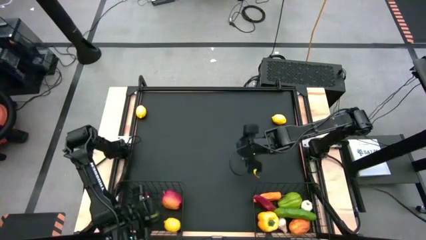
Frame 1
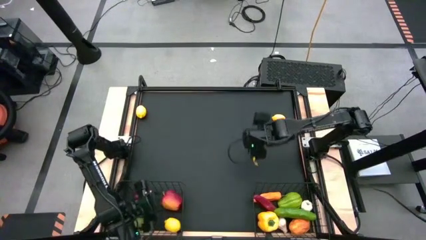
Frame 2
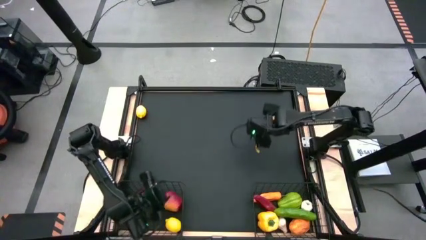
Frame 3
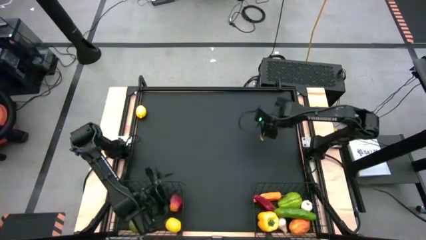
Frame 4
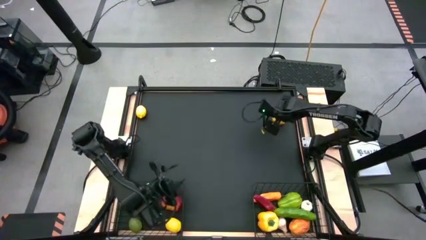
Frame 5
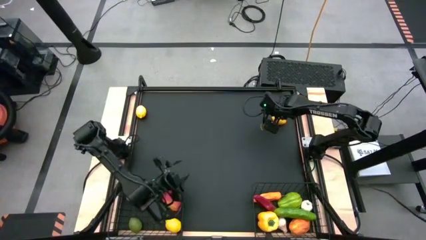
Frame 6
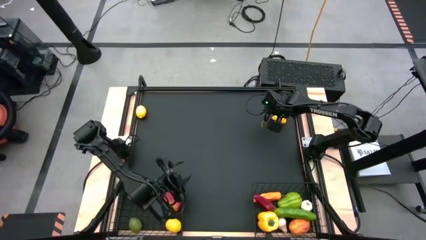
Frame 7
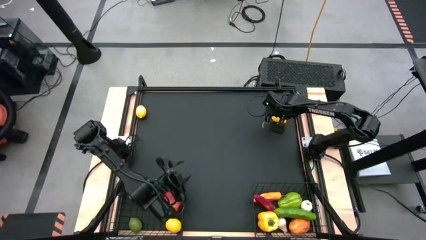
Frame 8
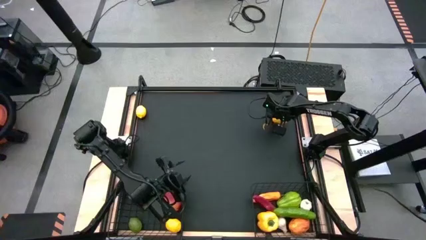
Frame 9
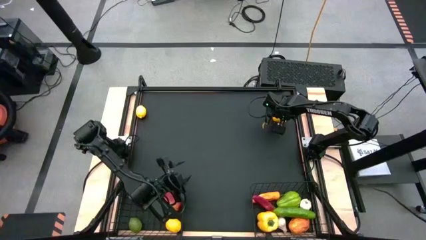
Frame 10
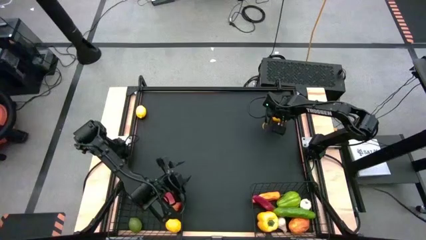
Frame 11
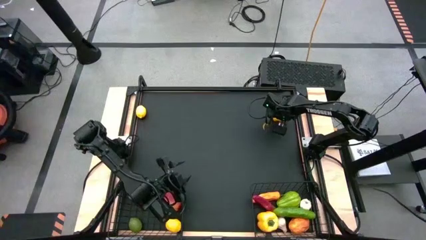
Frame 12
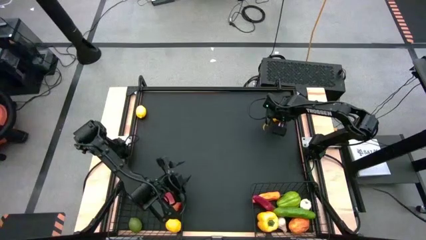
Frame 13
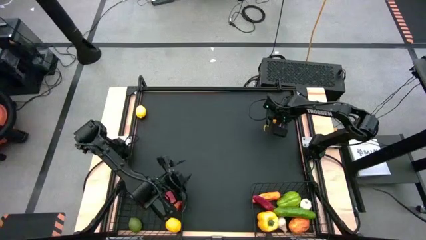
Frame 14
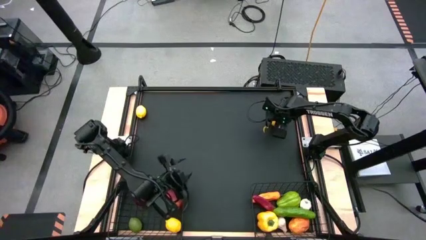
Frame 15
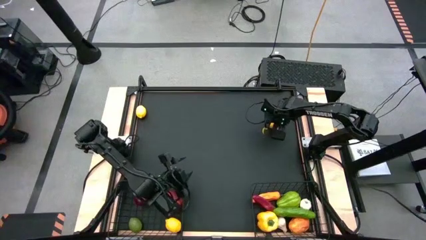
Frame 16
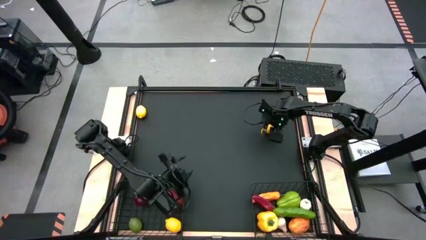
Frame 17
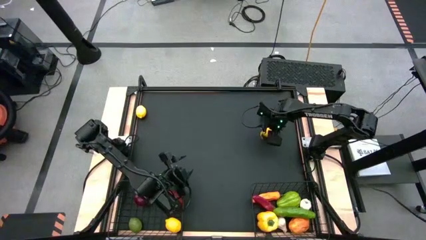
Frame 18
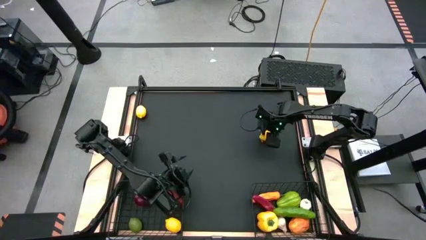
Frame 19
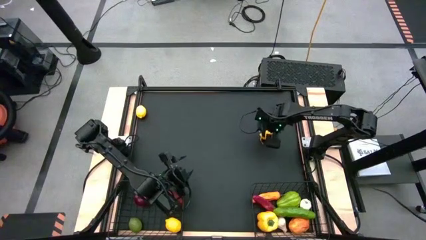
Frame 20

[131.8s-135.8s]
Task: Sort produce into baskets
Put the right yellow lemon into the left wire basket

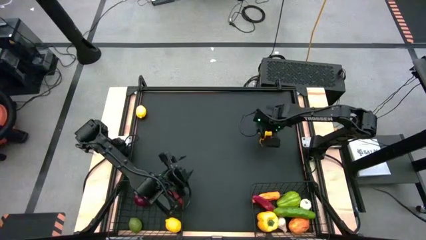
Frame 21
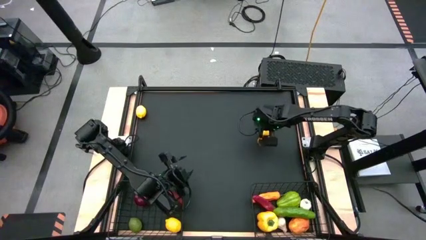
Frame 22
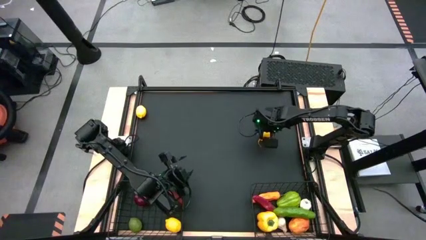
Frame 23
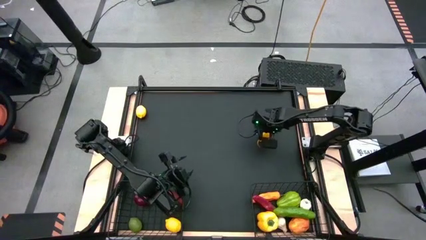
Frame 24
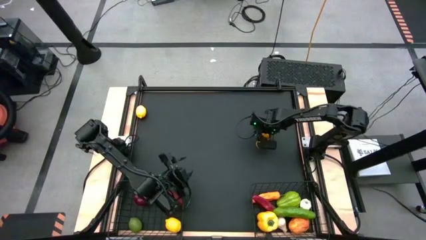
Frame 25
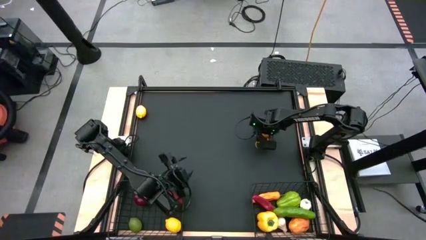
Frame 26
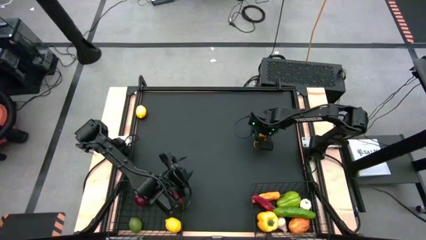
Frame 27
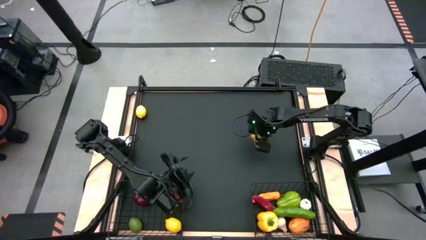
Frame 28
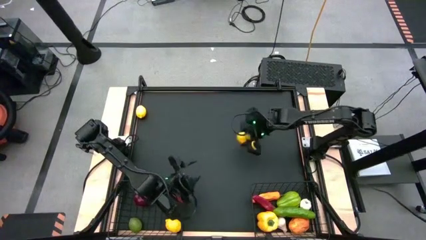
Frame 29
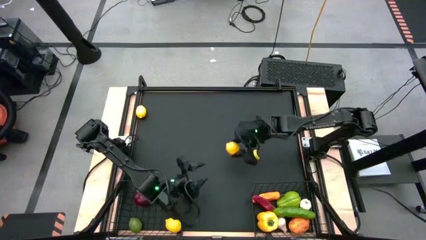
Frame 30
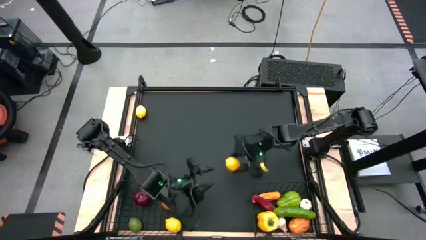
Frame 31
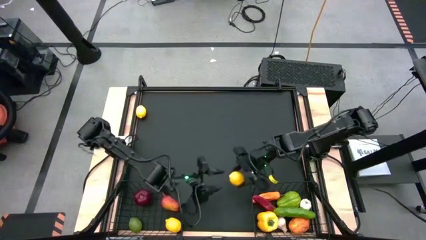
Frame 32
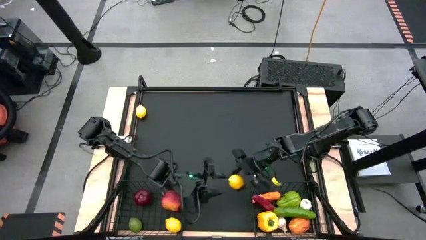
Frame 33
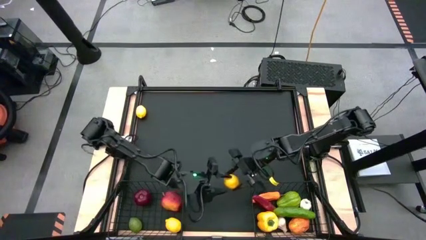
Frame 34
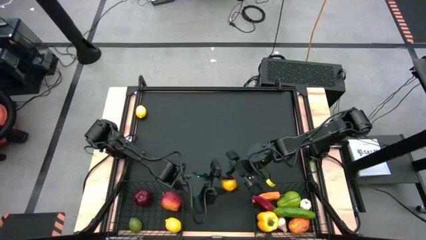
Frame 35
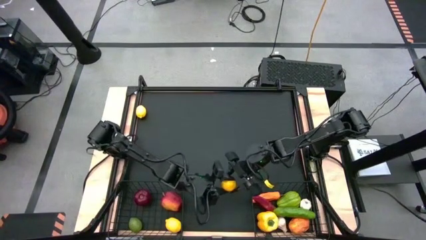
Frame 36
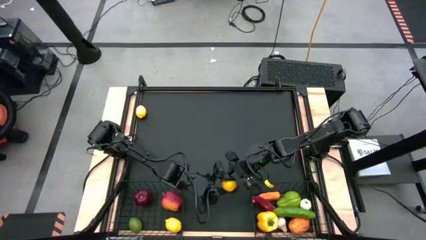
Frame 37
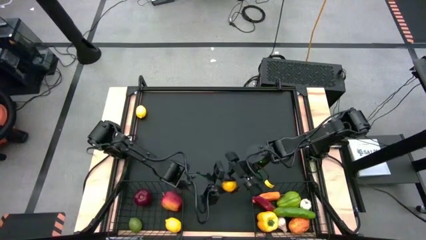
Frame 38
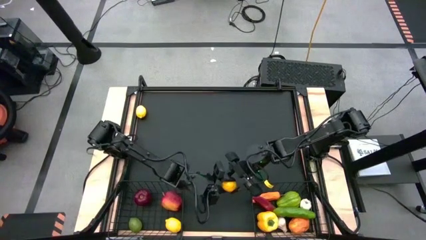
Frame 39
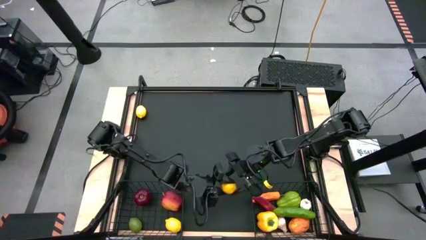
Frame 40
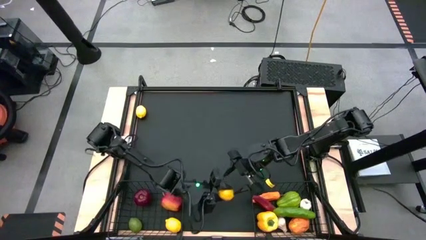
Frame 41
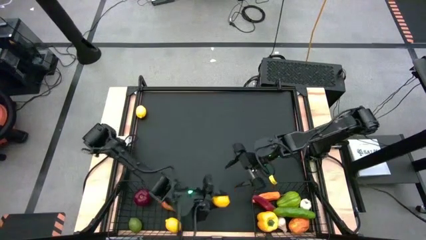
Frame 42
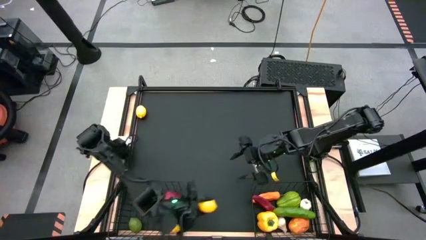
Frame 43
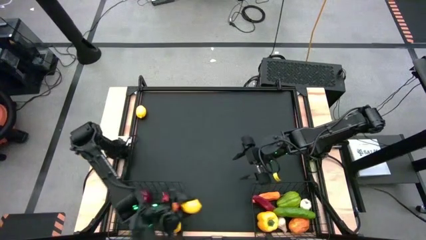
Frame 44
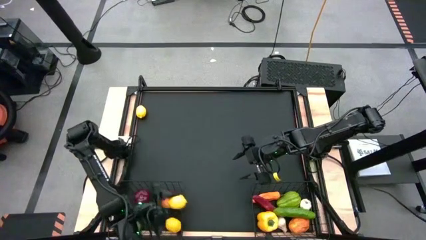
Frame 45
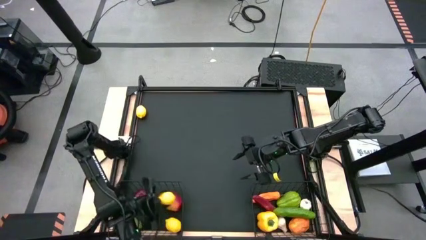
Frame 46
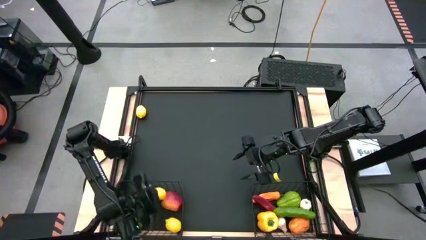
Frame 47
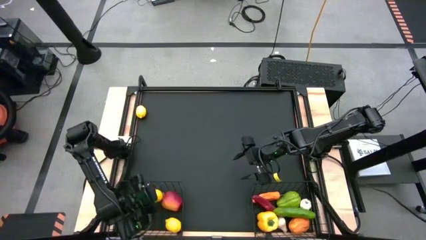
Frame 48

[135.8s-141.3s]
Put the right yellow lemon into the left wire basket

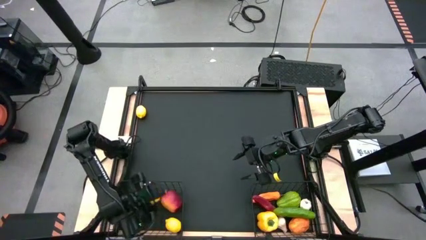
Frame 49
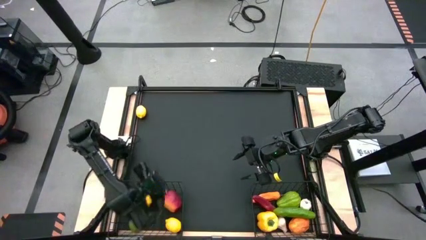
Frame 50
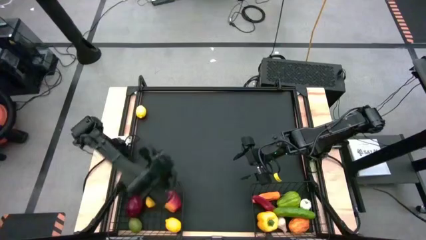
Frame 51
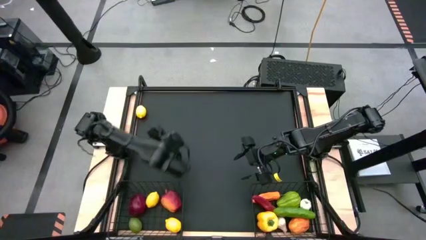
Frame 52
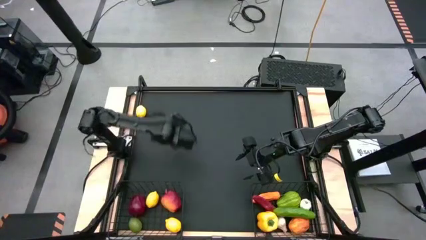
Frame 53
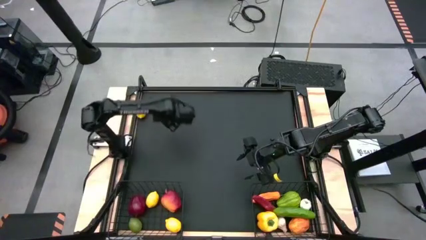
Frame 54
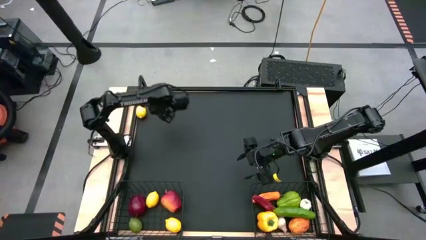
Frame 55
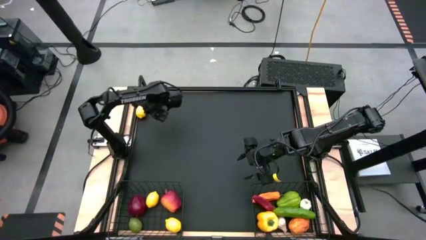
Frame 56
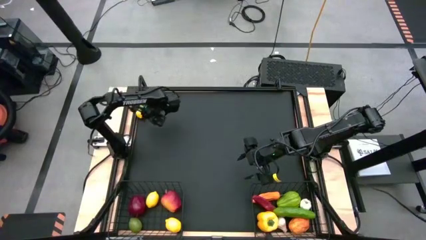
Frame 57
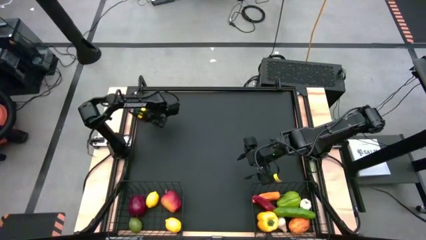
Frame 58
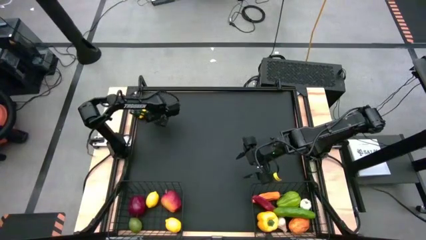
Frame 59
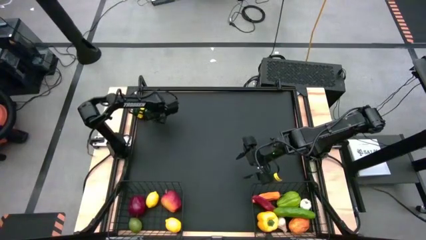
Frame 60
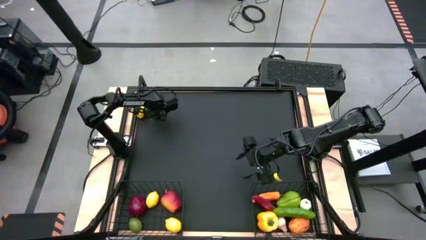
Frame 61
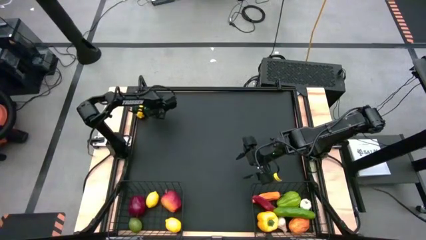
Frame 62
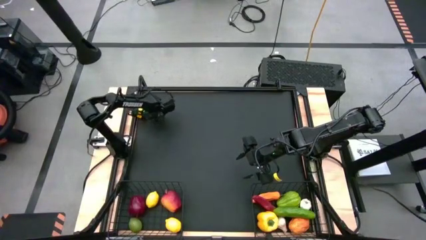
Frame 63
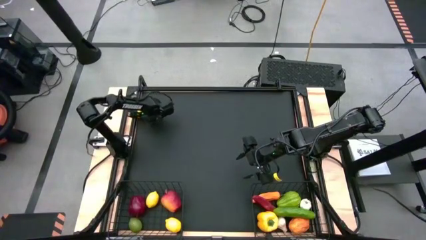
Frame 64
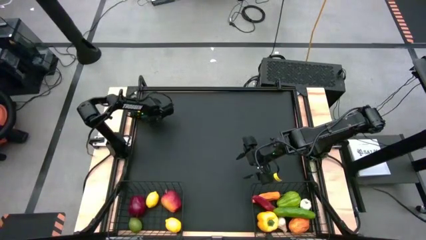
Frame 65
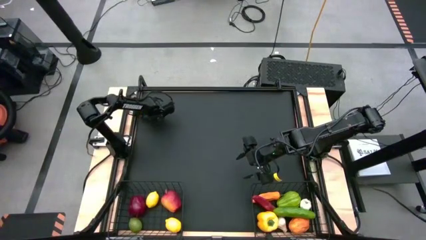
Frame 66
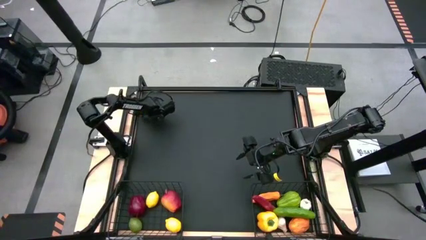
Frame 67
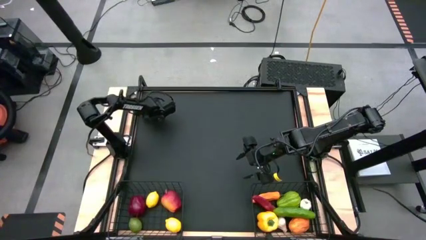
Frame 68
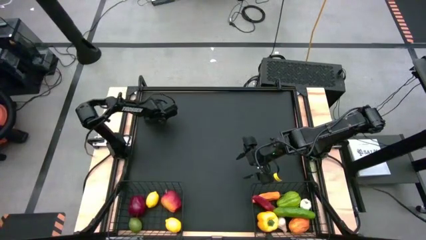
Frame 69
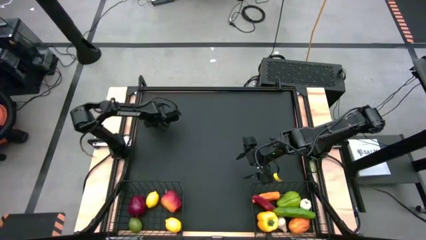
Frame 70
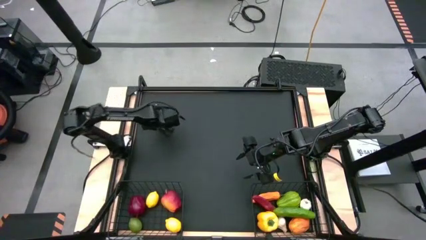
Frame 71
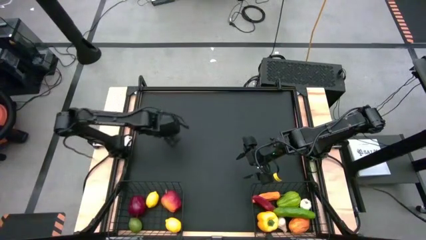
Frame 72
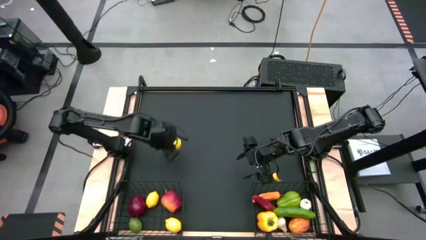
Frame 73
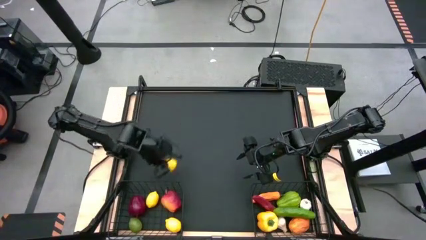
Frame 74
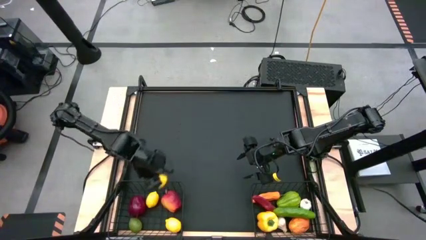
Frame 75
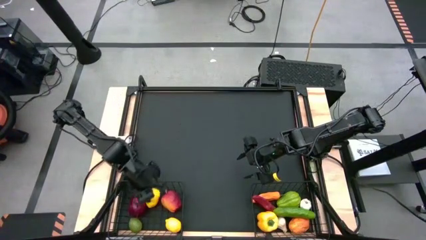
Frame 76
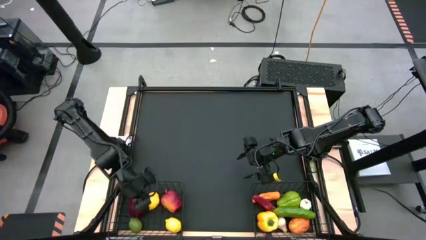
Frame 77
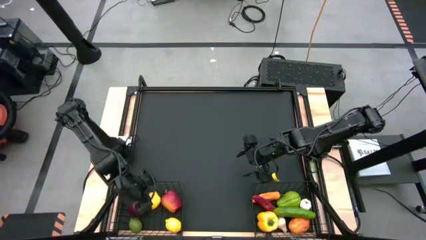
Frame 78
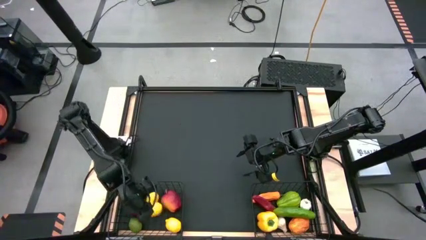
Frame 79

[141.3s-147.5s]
Put the yellow lemon into the left wire basket
